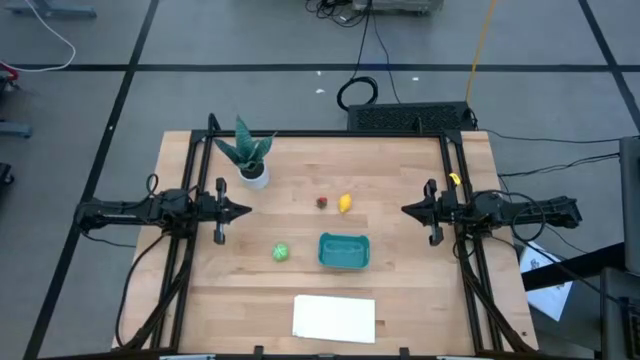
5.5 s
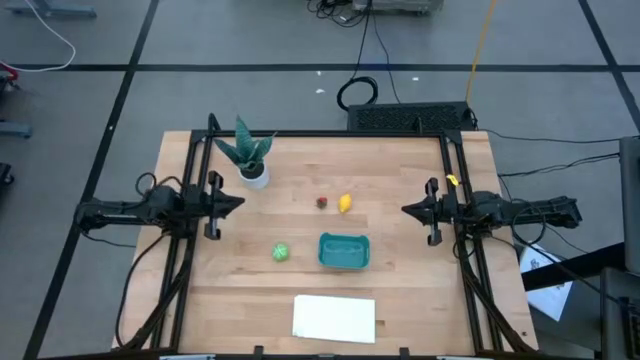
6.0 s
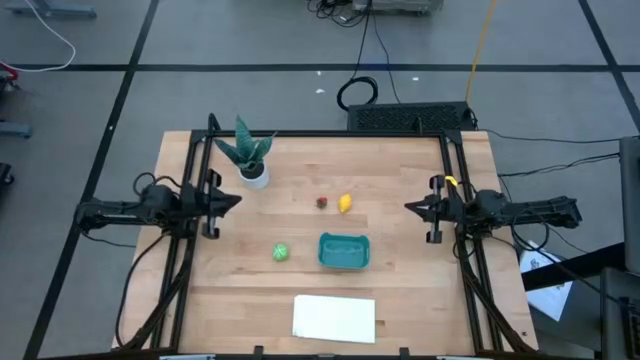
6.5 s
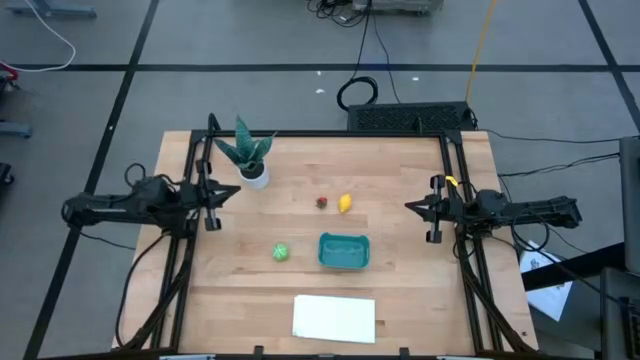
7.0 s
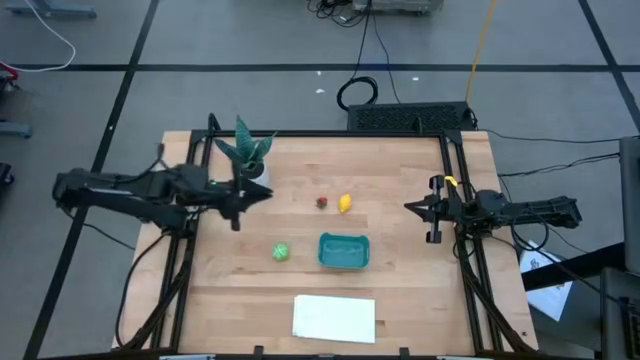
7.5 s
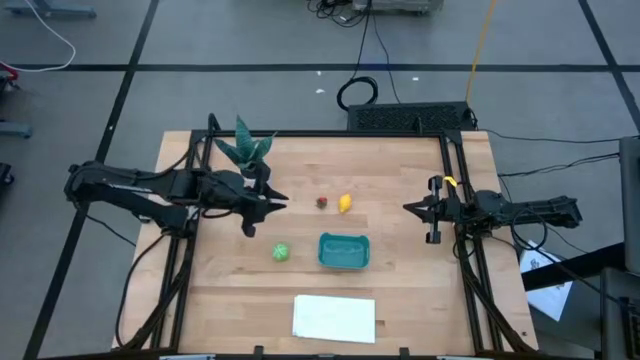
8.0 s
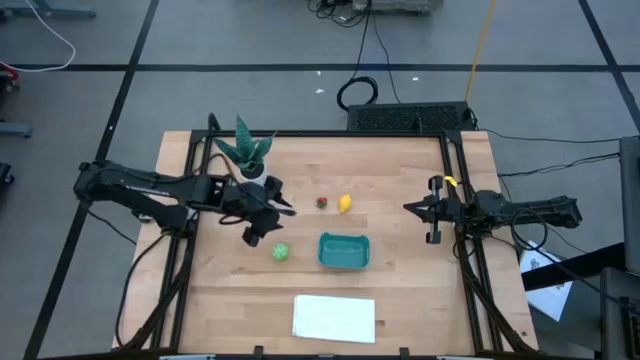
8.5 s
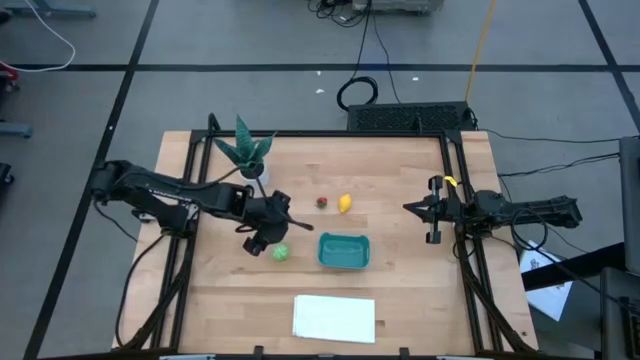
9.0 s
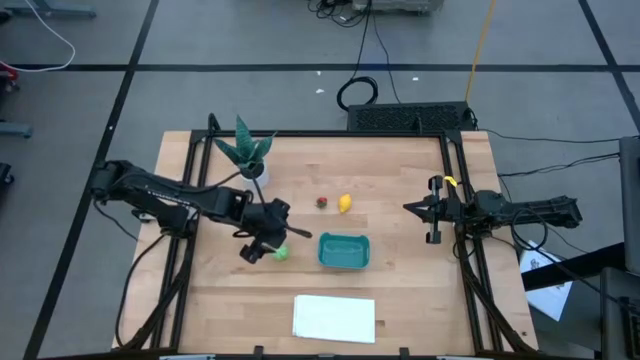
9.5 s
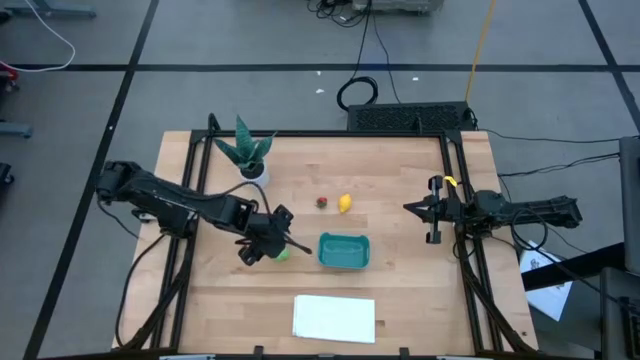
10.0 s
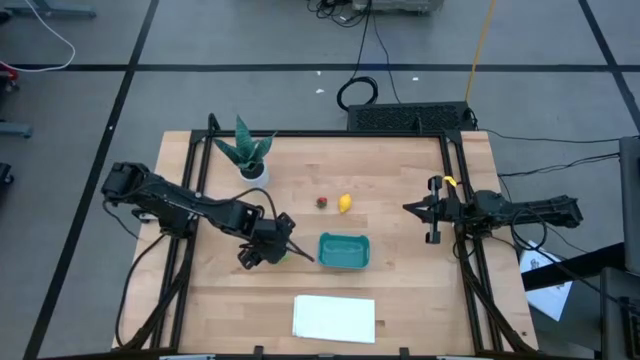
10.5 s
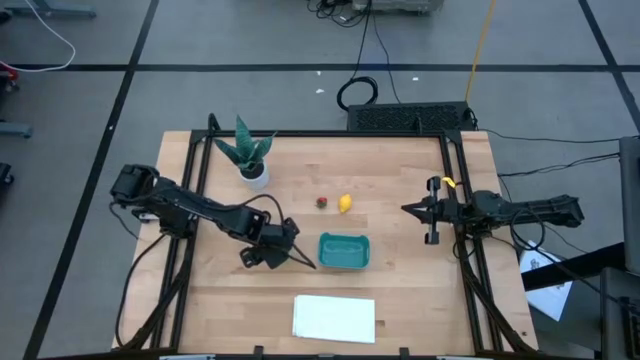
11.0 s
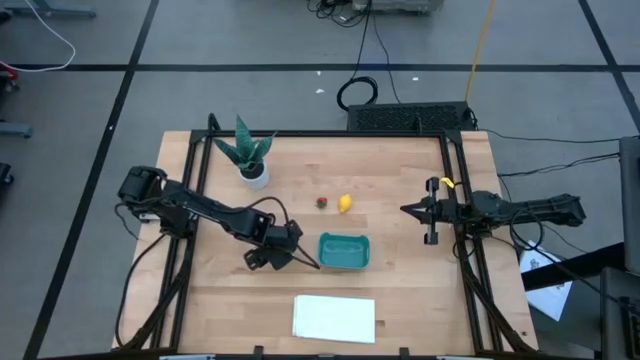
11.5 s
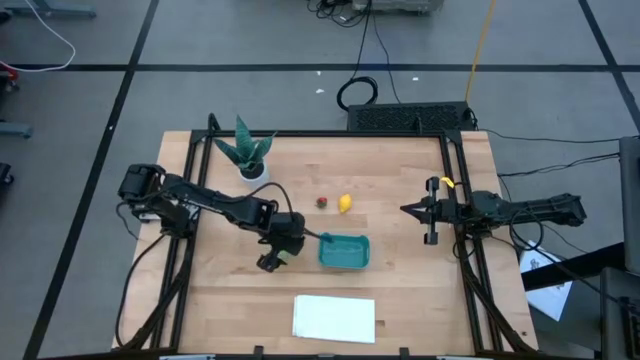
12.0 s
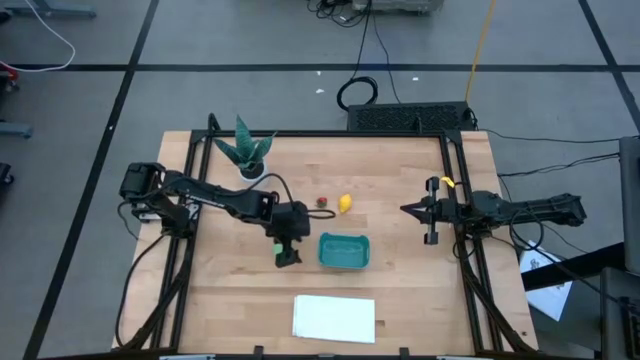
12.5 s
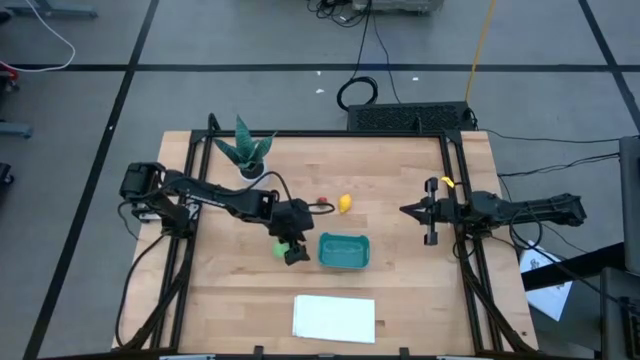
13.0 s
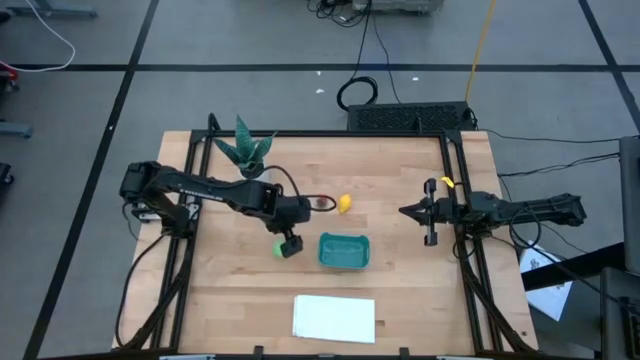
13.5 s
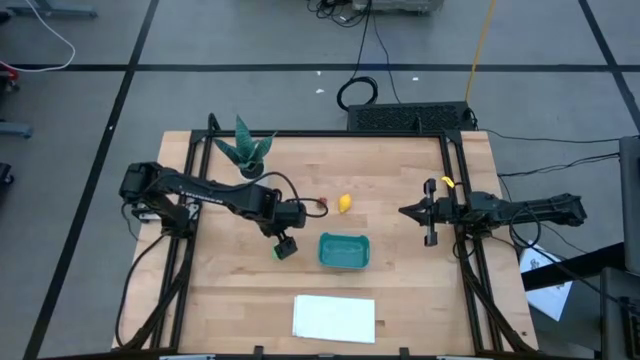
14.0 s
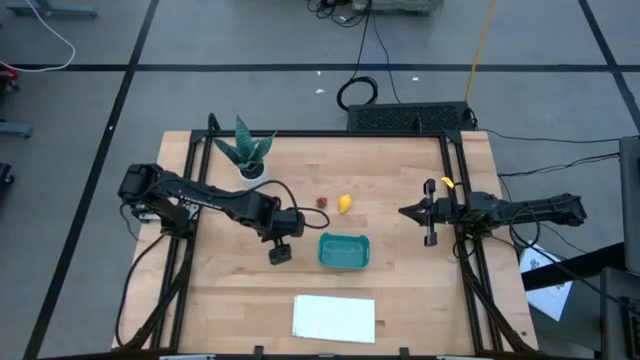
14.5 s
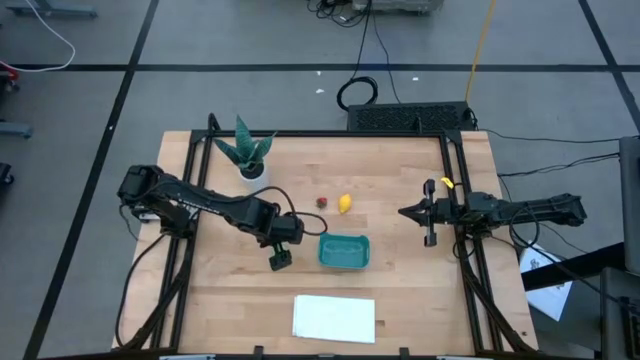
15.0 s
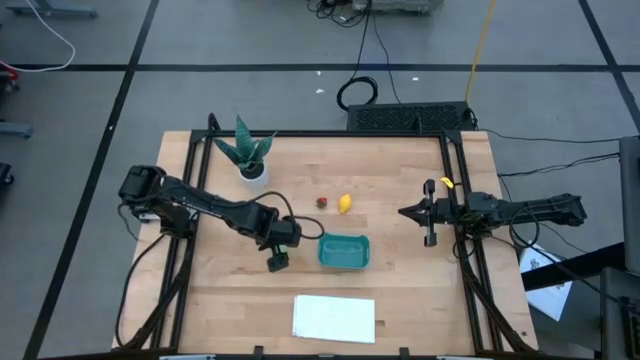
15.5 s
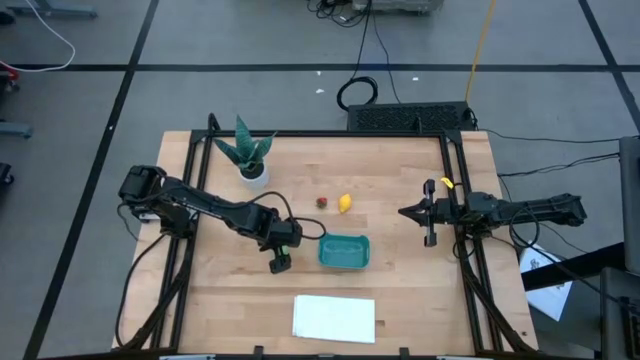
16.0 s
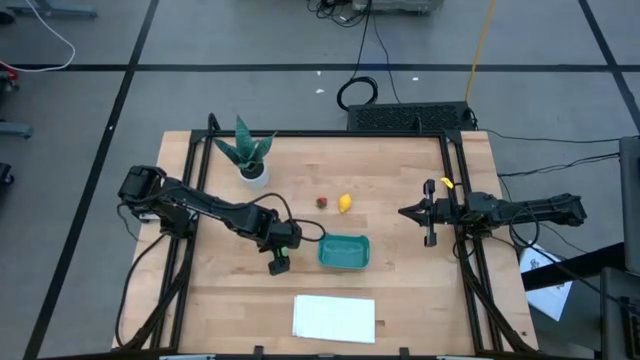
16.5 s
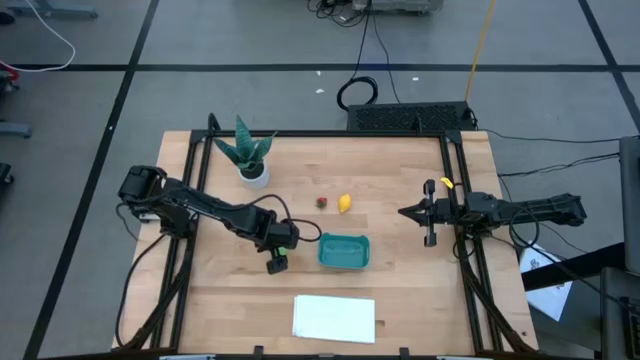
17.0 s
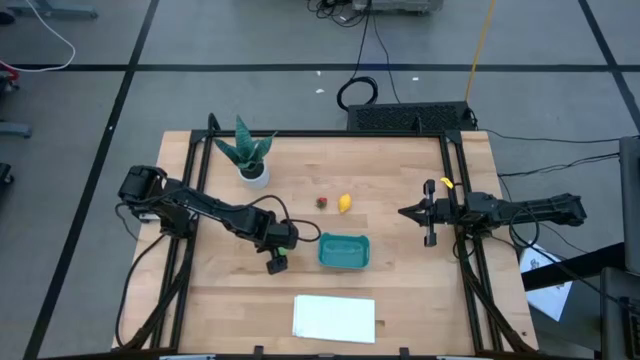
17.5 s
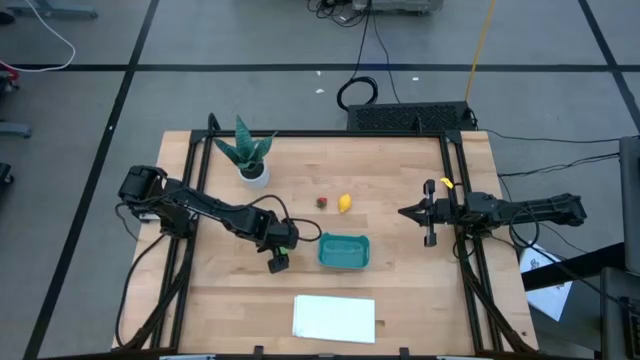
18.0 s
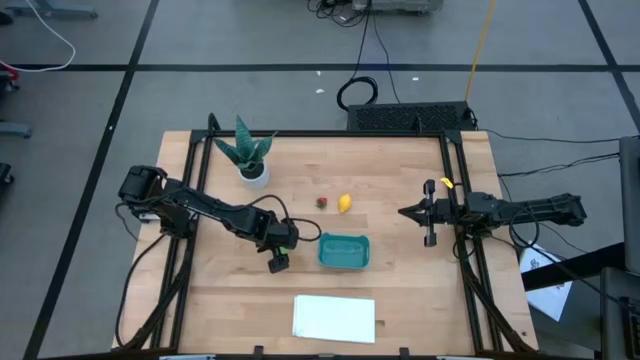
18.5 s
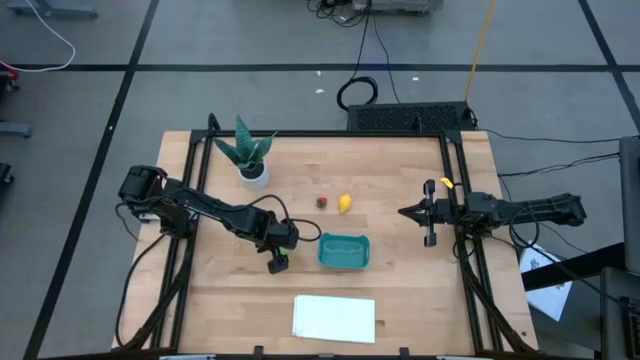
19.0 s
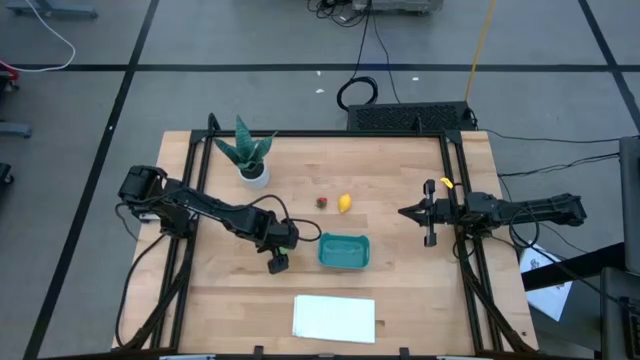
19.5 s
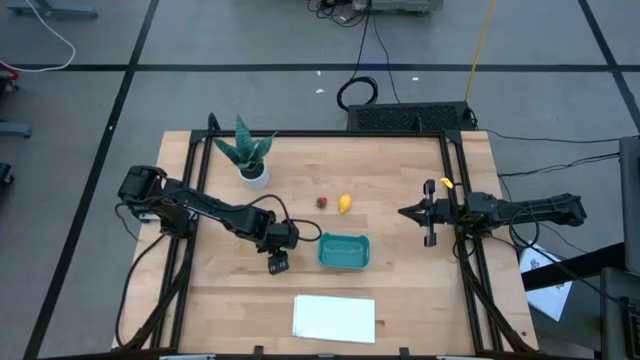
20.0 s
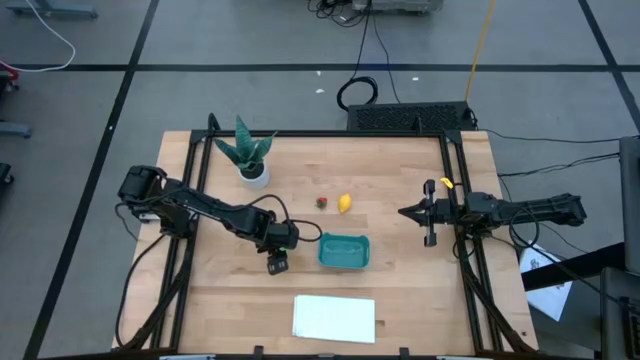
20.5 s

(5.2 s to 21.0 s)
Task: Pick and placing Produce into tupperware
Put the cabbage into the blue bin
